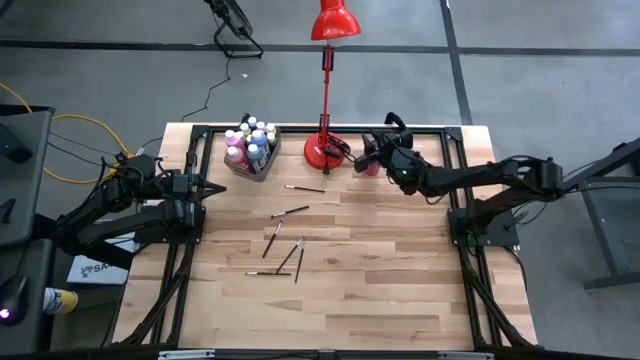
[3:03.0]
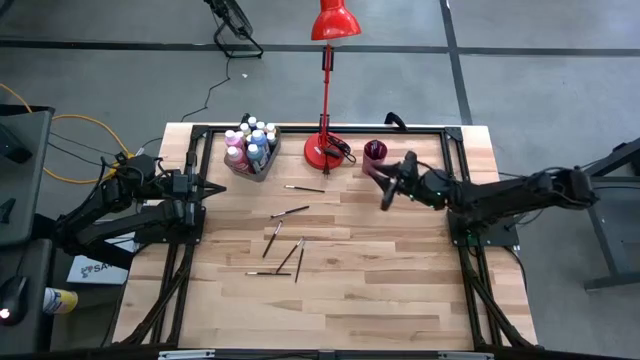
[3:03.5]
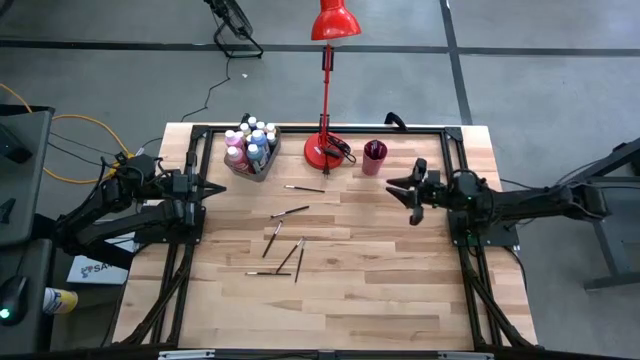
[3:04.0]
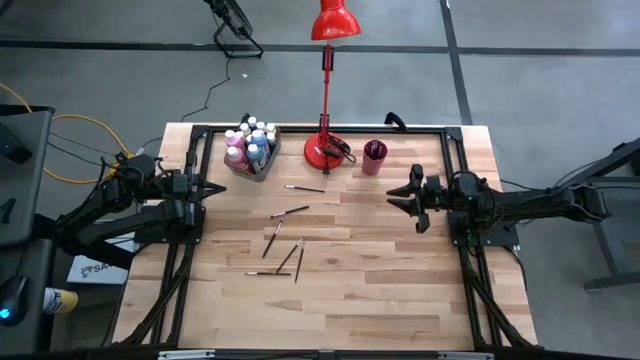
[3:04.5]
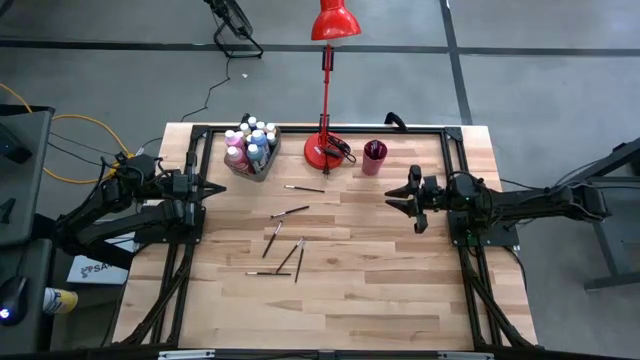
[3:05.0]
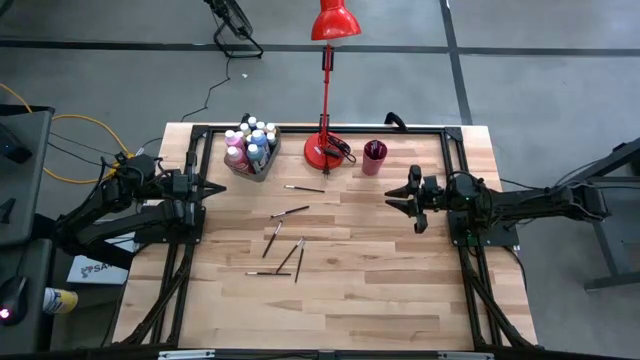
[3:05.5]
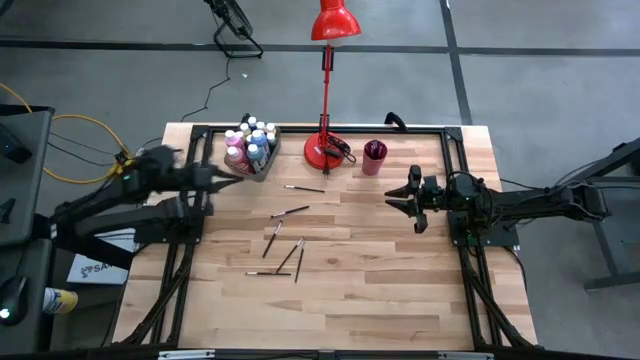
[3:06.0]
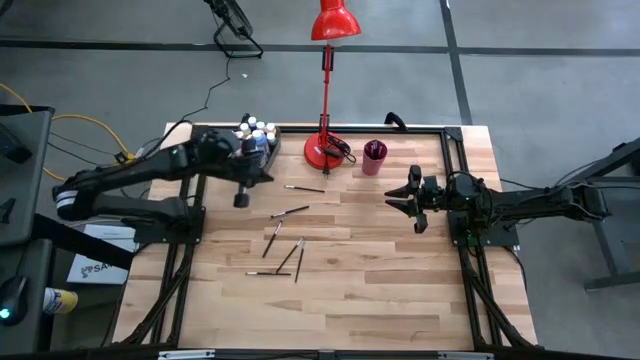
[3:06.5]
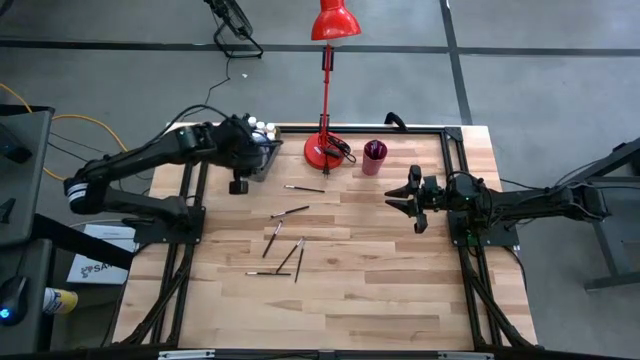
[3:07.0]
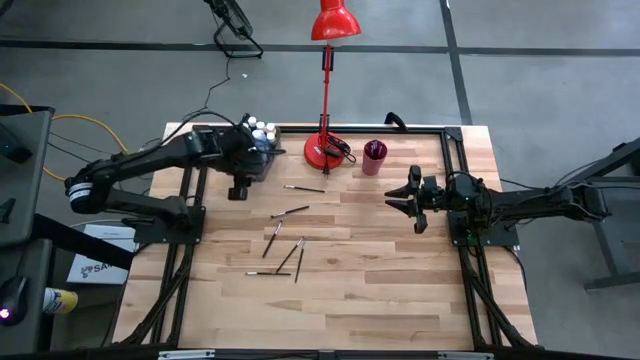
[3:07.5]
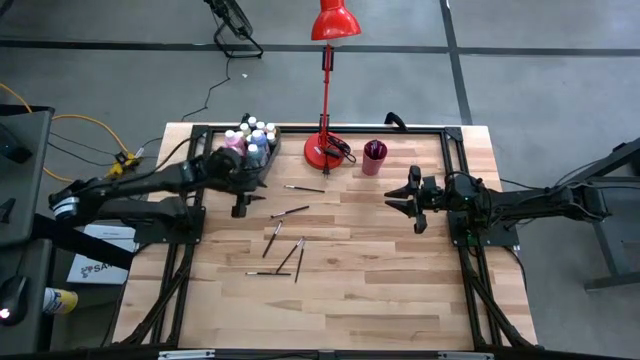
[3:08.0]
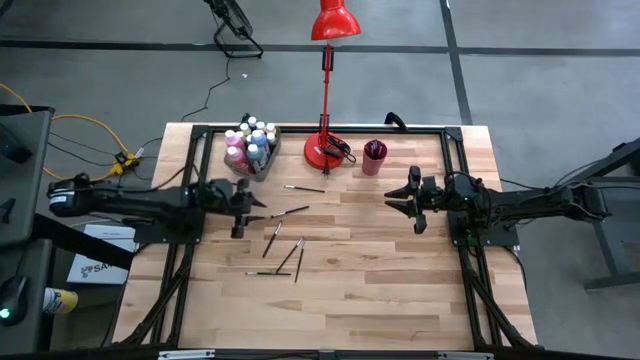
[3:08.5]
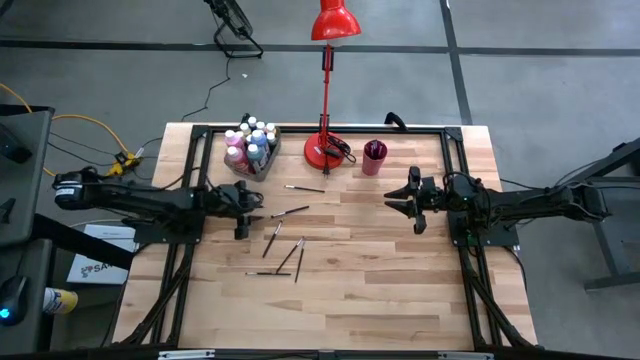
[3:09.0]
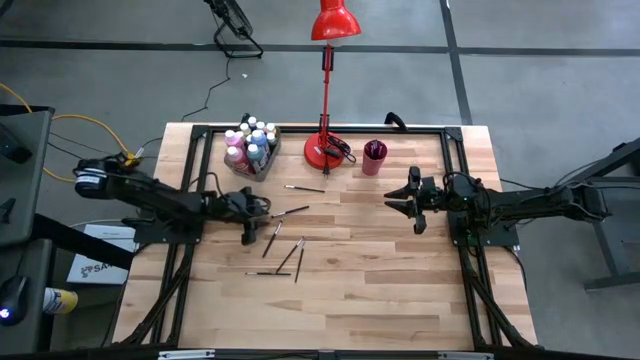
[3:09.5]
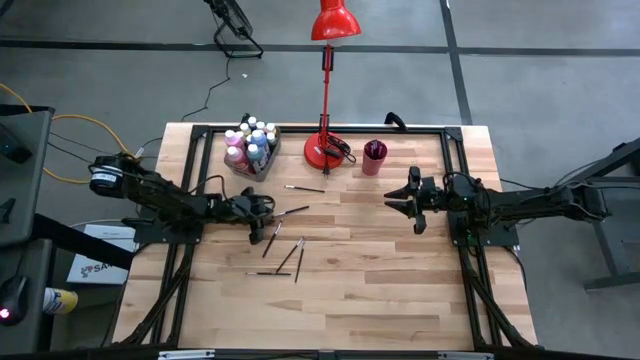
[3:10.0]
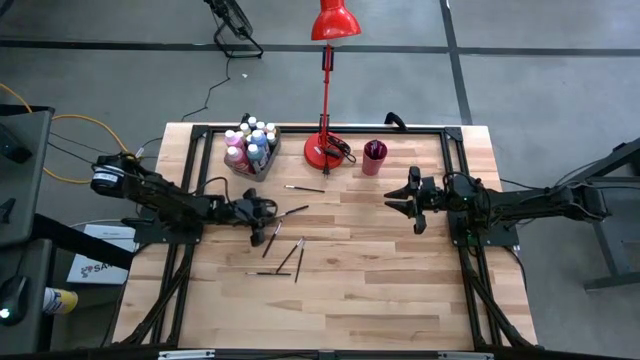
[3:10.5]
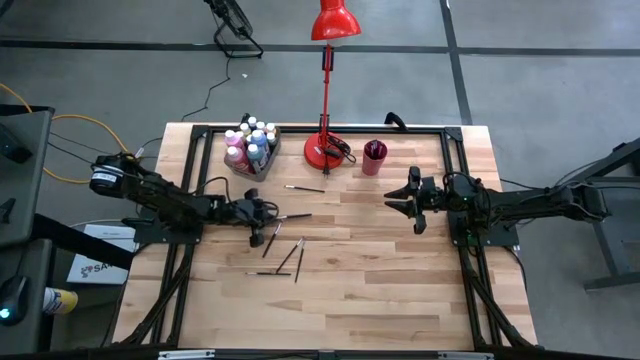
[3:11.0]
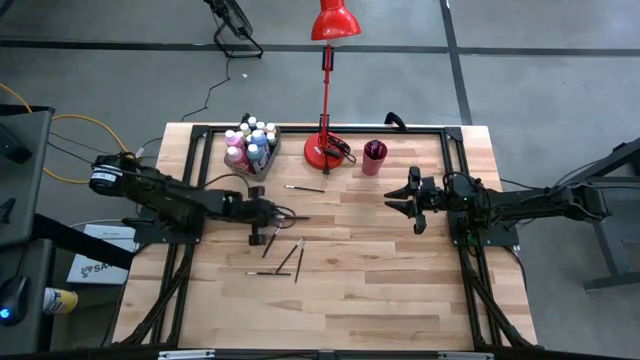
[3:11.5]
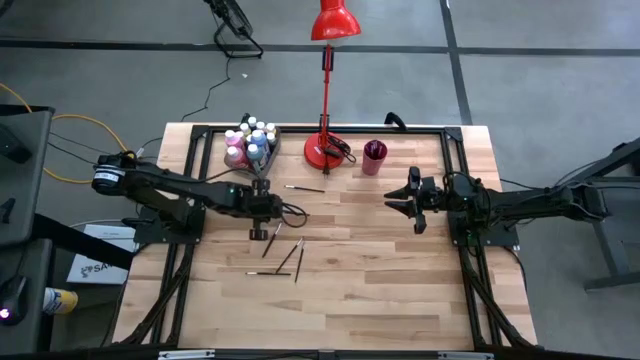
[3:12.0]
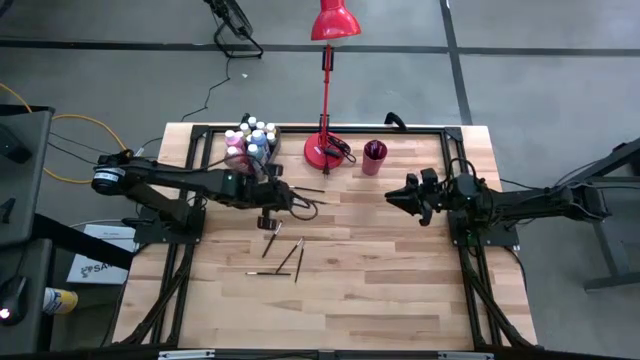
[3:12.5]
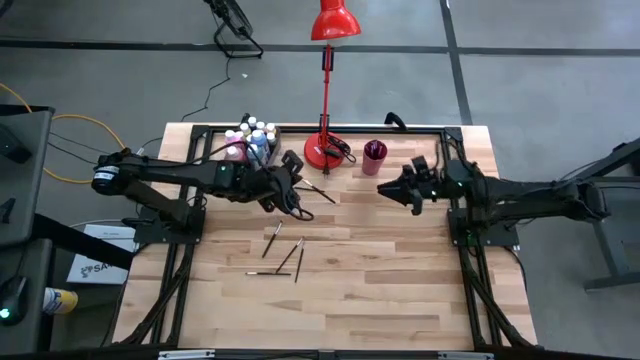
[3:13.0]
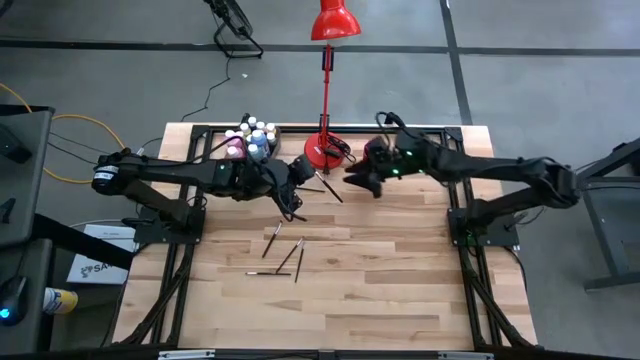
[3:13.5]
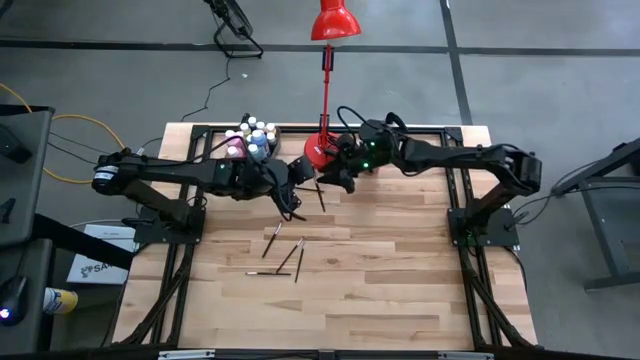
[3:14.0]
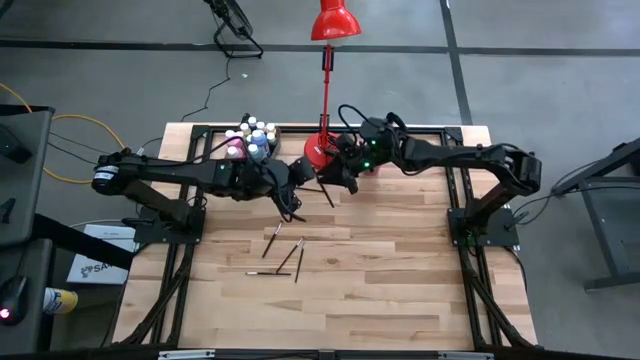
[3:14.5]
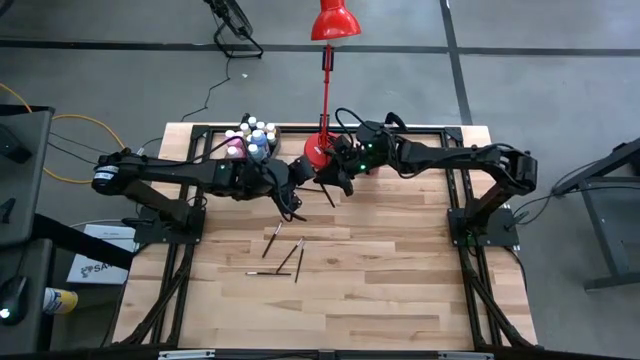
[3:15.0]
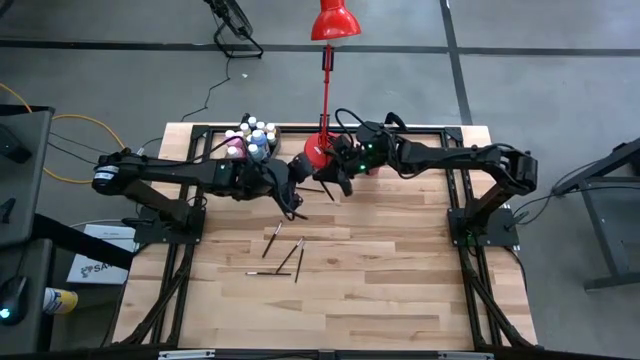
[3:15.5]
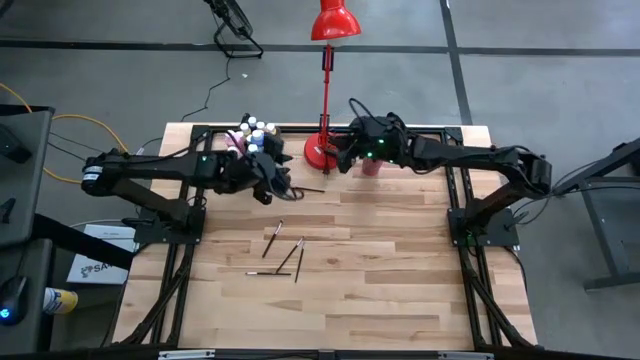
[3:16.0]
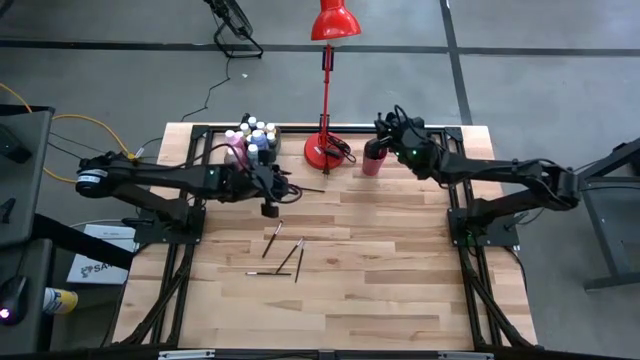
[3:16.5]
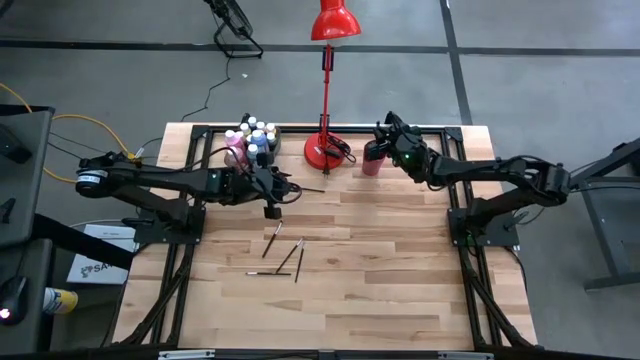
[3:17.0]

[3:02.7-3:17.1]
Task: Pick & Place Paint Supplies
Put the paint brush into the cup

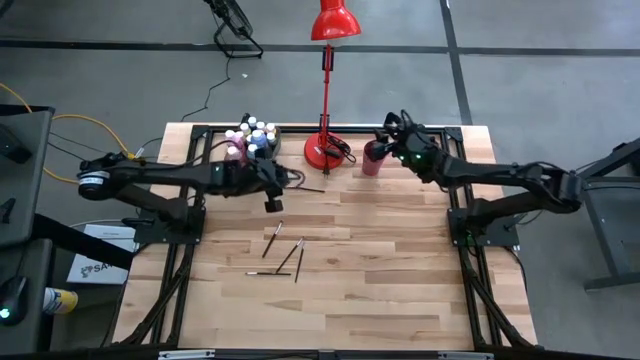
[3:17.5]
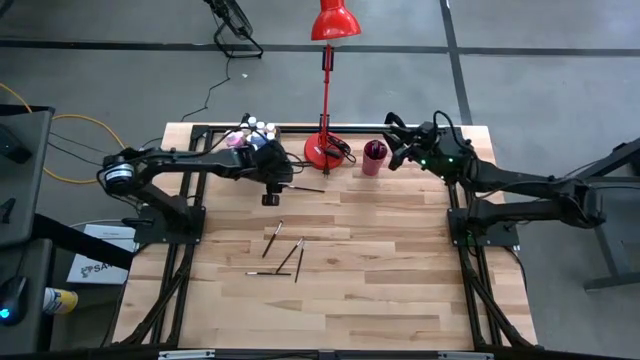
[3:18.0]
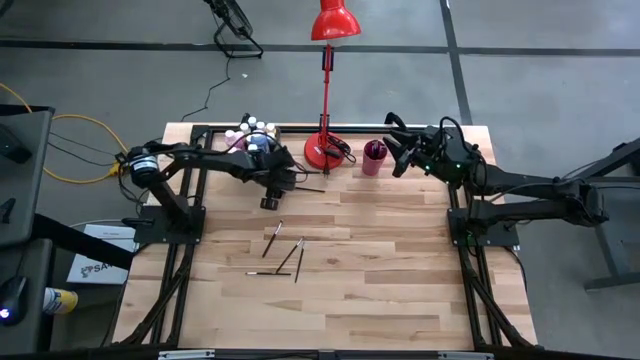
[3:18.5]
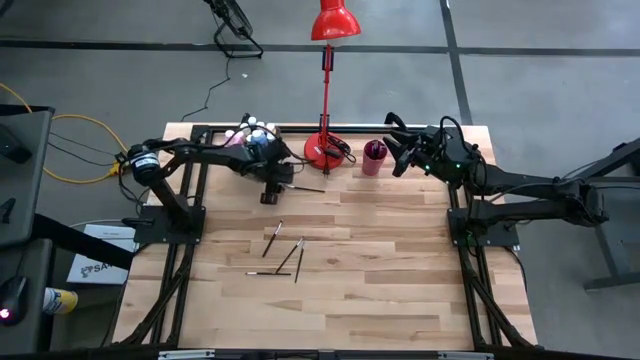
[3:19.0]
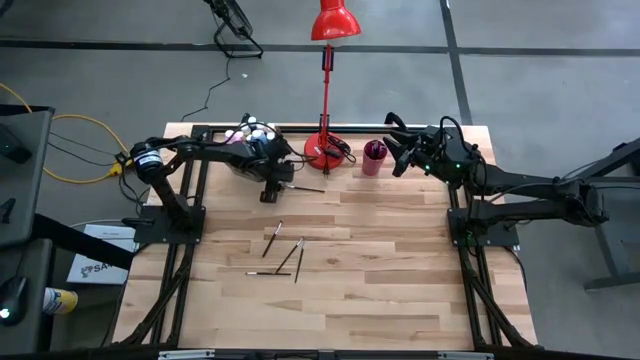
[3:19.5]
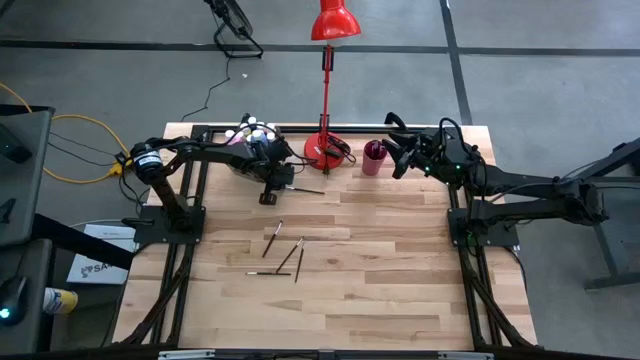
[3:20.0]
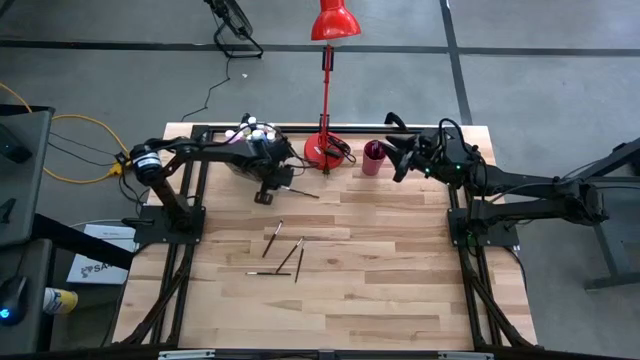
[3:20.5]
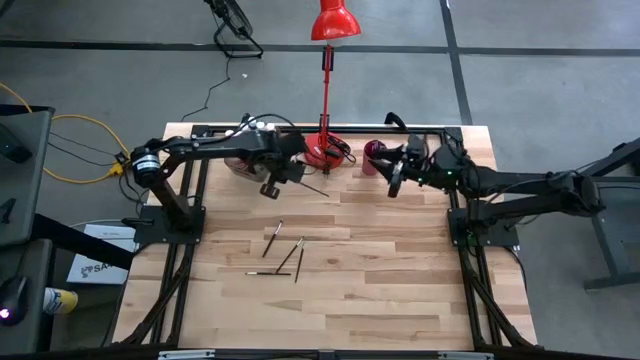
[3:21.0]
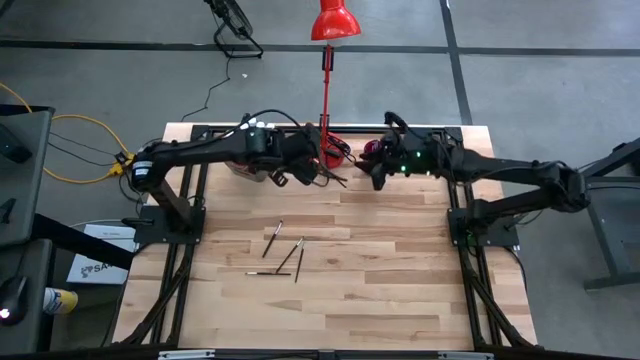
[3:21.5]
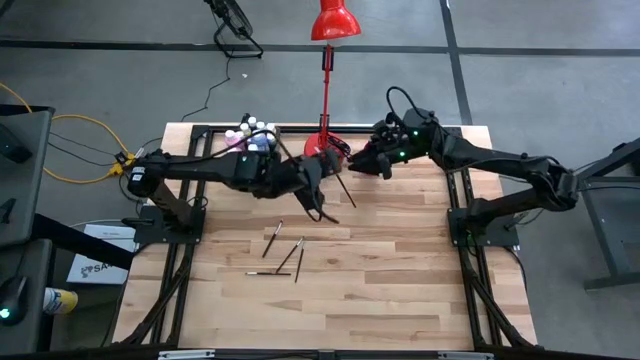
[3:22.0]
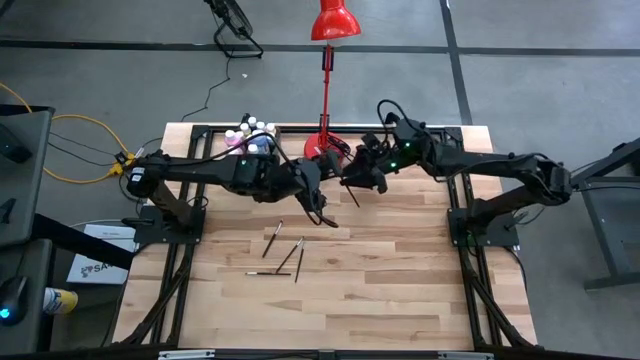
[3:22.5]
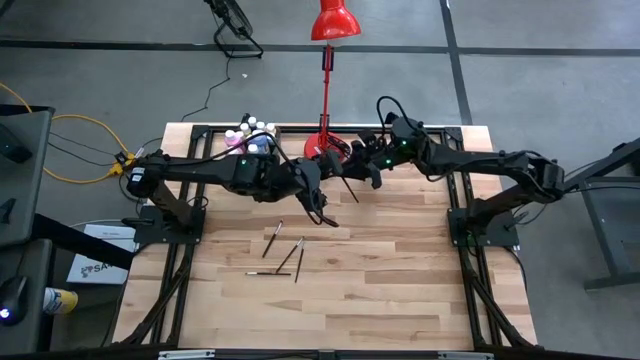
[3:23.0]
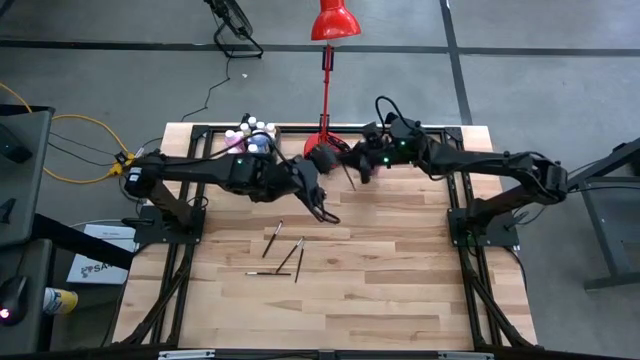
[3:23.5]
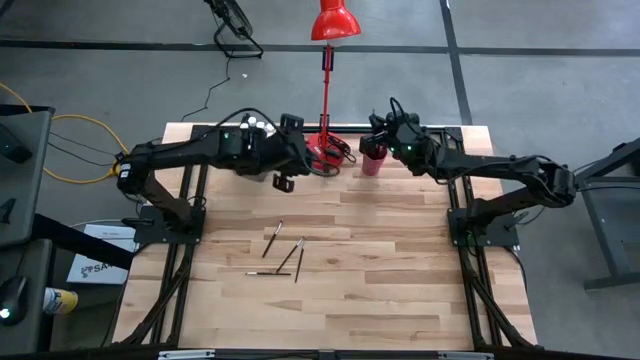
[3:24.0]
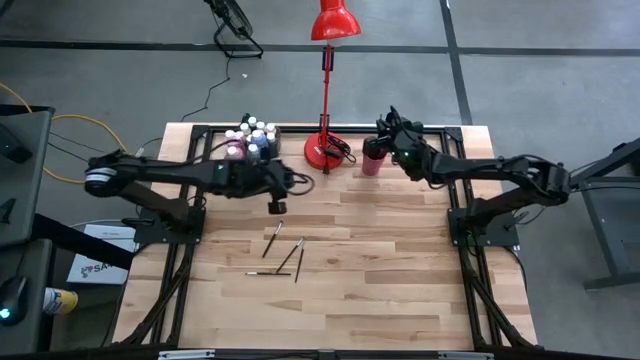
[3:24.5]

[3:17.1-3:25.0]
Put the paint brush into the cup
